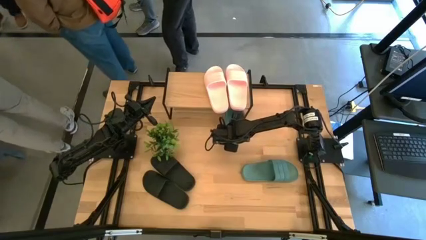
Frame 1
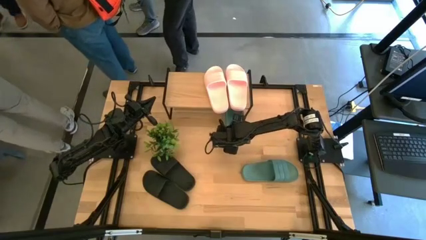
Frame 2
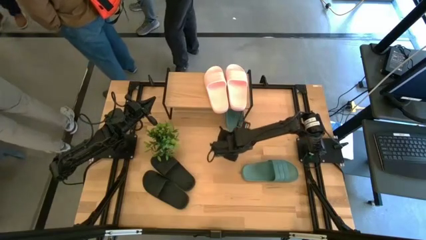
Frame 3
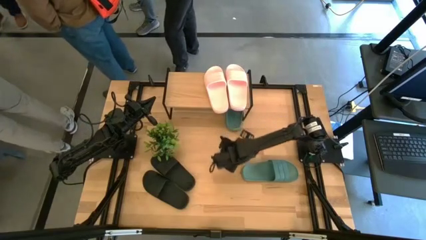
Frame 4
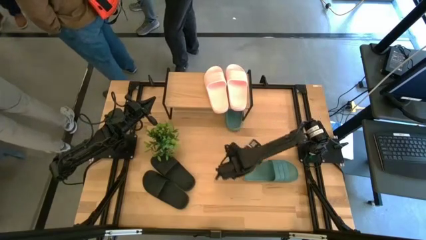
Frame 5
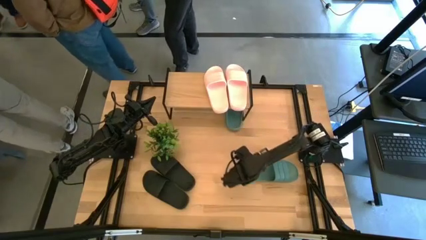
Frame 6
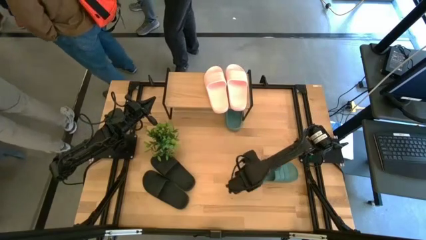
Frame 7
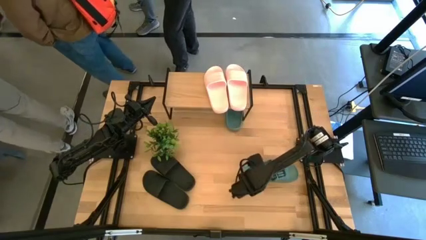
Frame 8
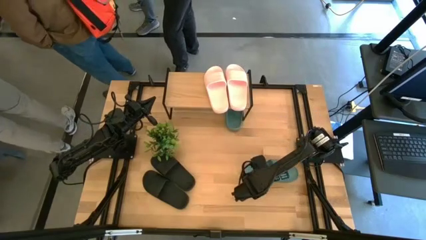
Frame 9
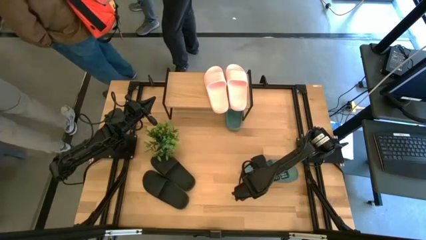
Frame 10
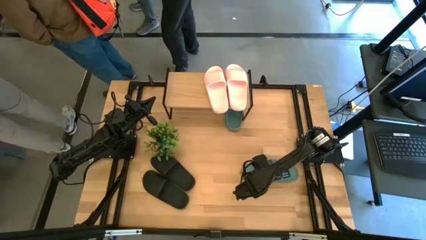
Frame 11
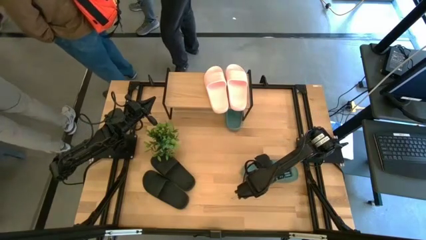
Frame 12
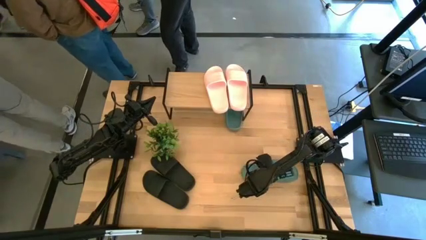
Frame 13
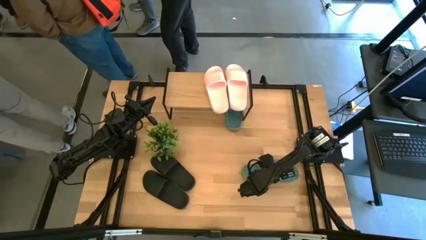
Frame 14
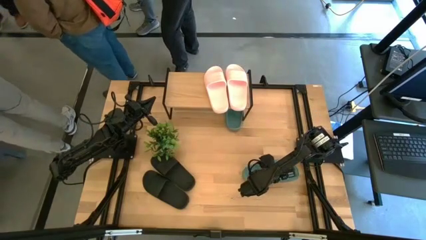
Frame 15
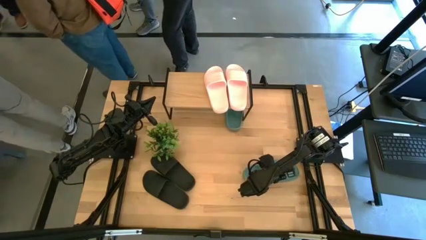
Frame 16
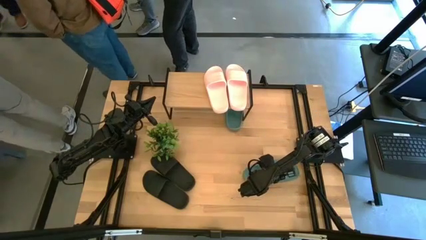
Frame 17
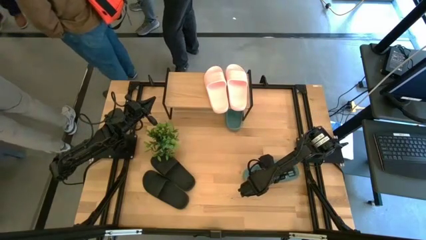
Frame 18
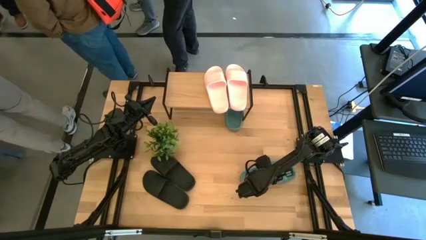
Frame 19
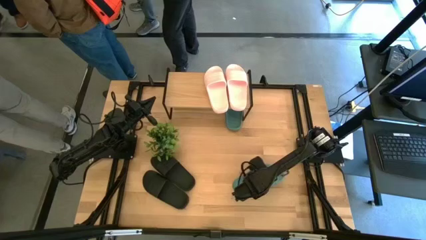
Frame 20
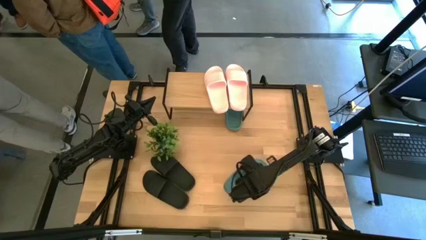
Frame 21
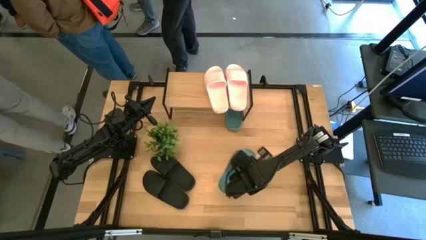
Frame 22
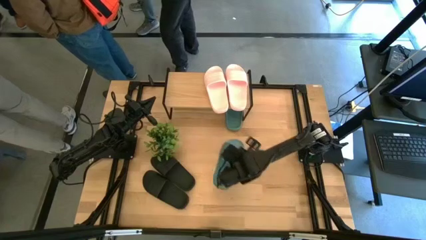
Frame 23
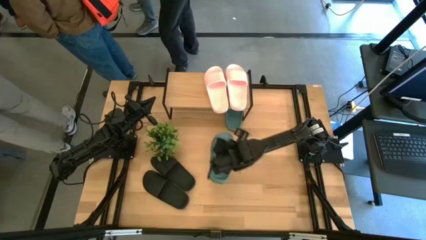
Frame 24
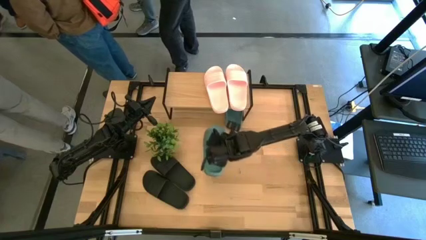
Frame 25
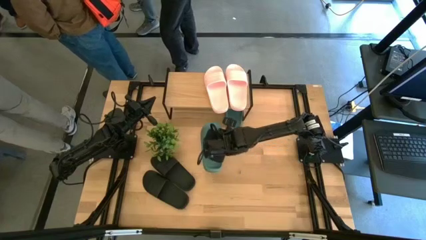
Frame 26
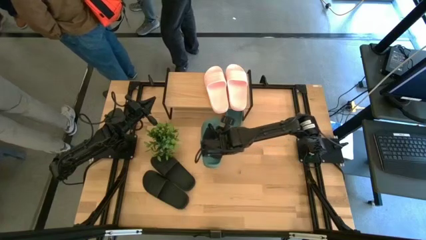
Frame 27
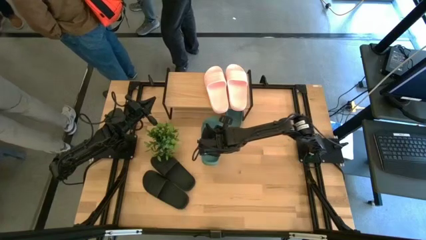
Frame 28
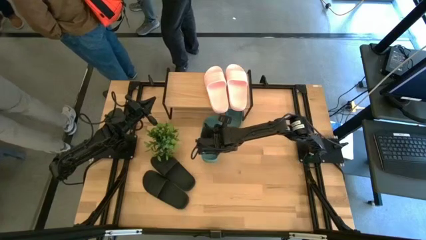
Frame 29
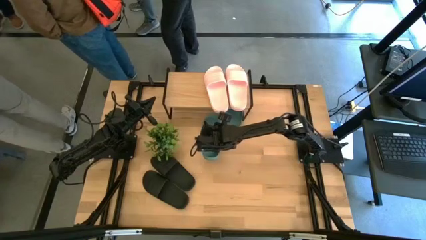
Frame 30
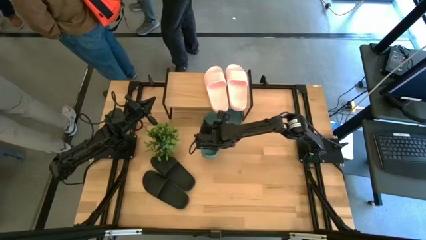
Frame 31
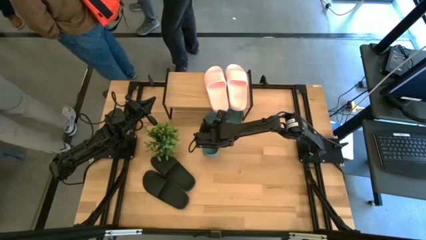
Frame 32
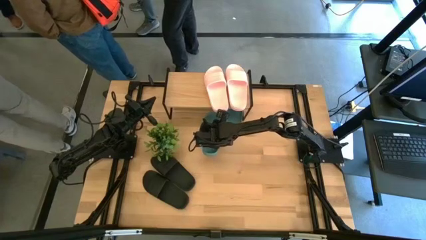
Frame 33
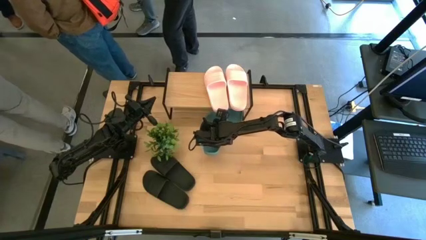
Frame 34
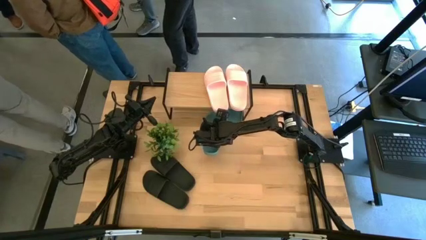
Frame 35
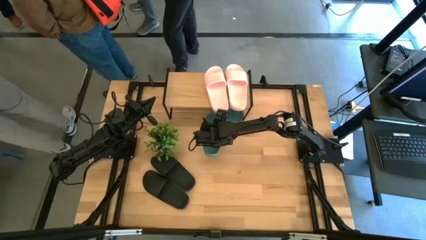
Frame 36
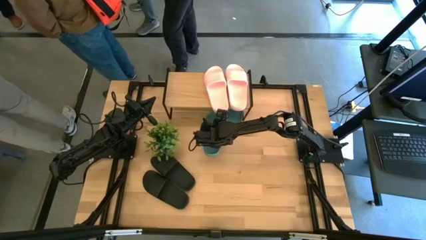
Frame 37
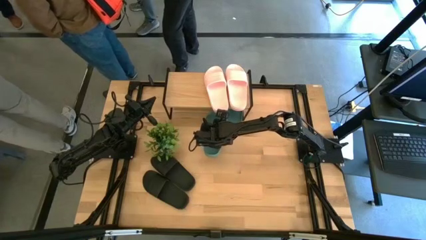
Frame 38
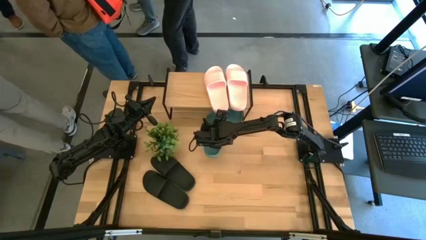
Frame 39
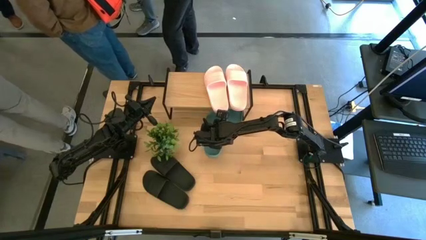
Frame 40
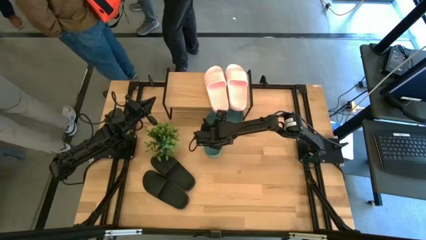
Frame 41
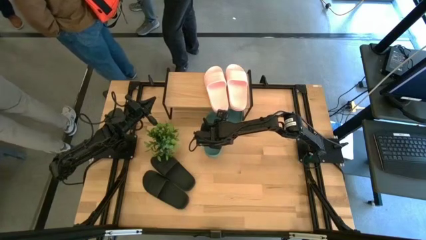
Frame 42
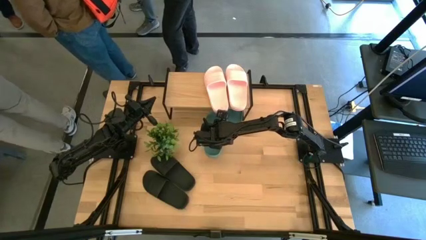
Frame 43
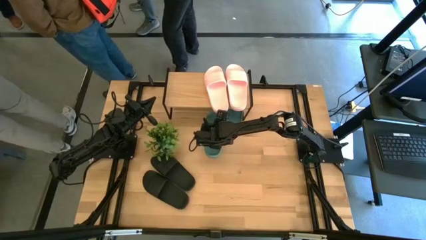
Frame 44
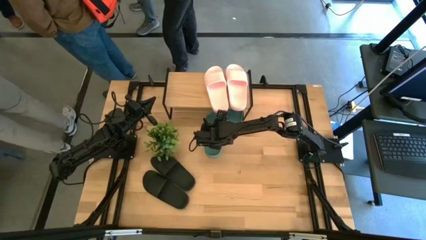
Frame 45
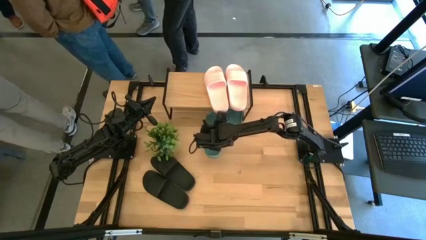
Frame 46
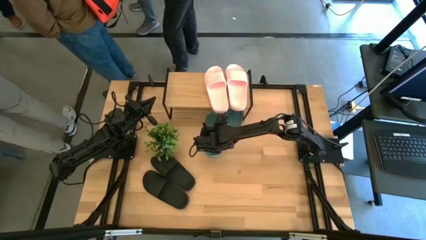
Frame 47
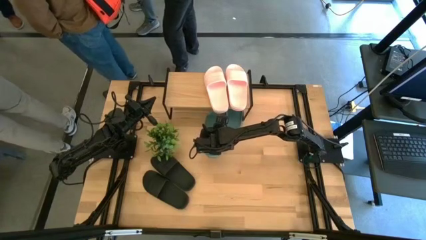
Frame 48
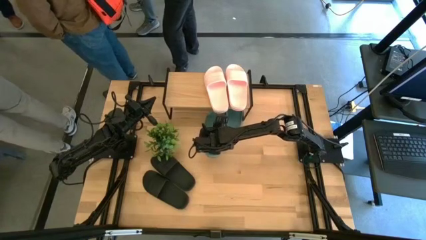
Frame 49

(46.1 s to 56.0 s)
Task: Pick and place slides into the shelf
Put the green slide under the shelf

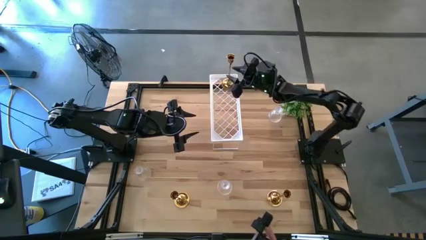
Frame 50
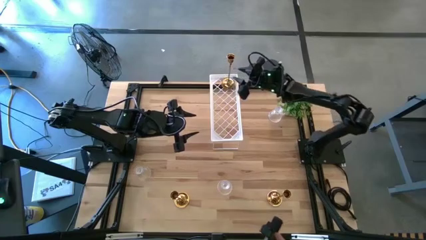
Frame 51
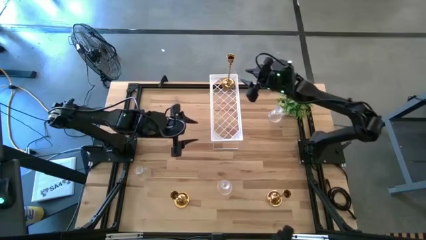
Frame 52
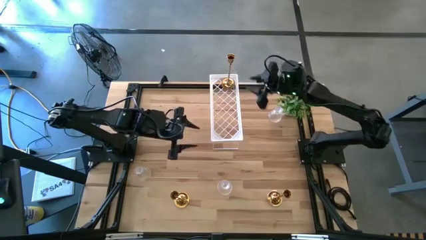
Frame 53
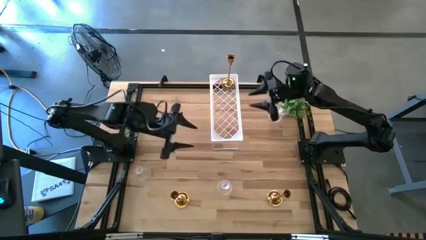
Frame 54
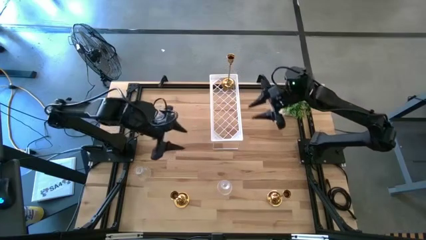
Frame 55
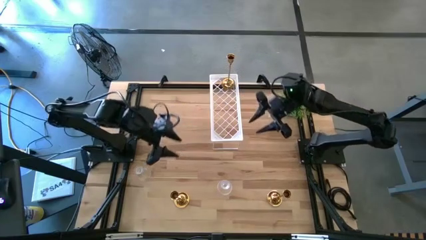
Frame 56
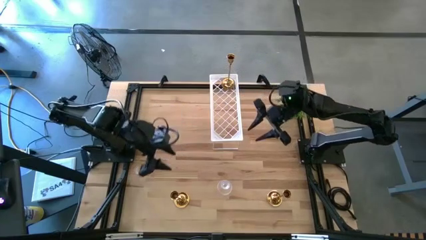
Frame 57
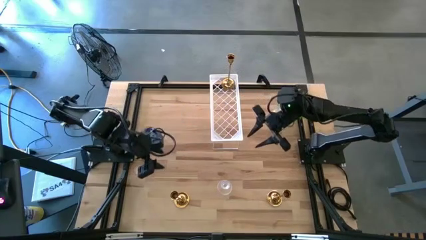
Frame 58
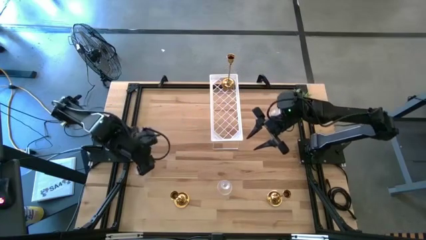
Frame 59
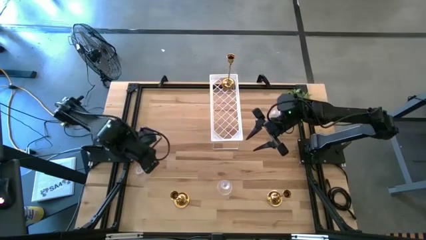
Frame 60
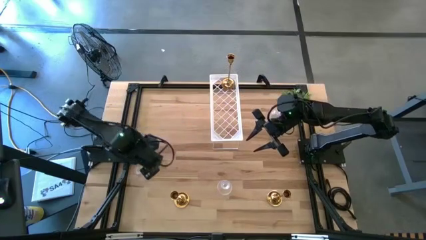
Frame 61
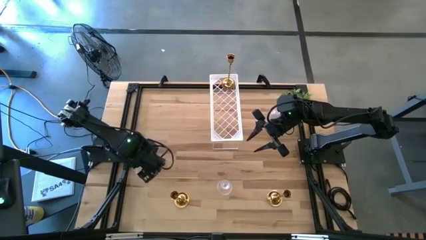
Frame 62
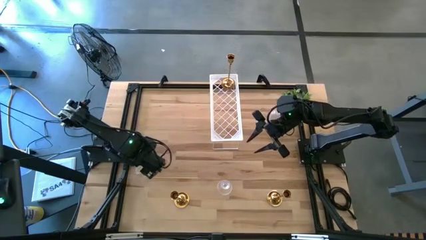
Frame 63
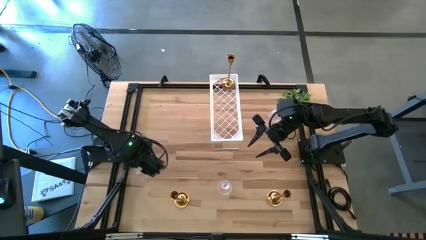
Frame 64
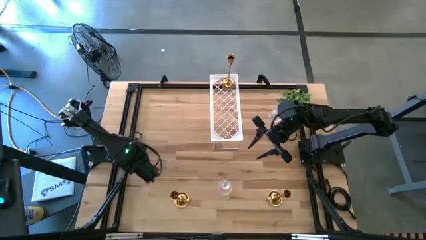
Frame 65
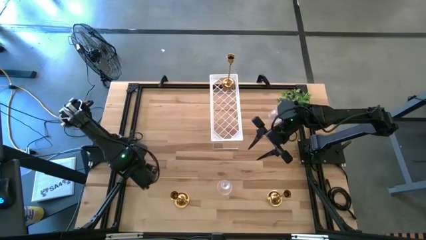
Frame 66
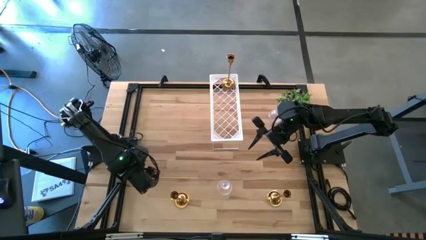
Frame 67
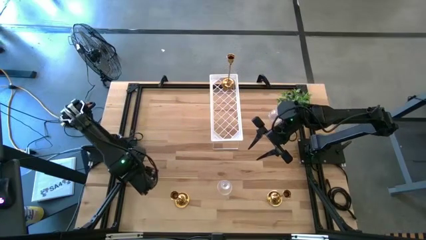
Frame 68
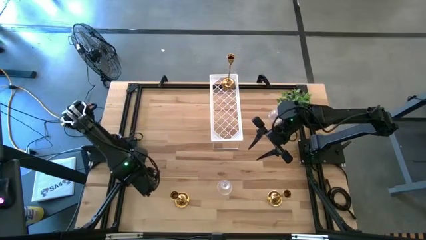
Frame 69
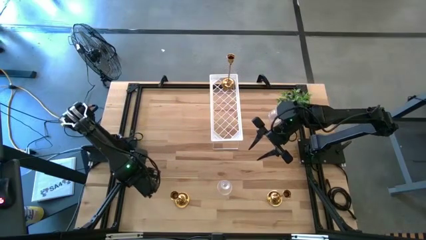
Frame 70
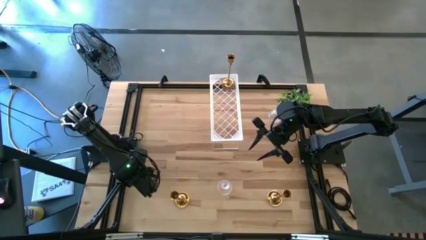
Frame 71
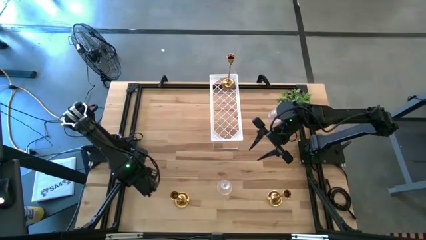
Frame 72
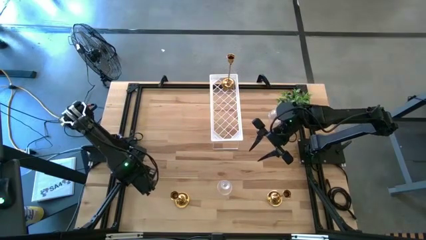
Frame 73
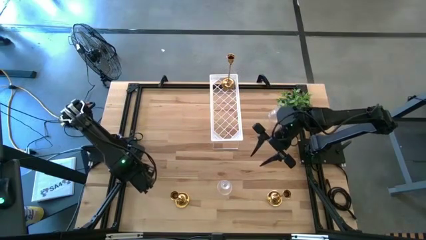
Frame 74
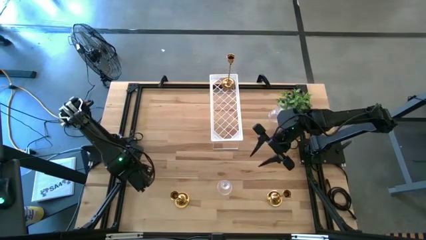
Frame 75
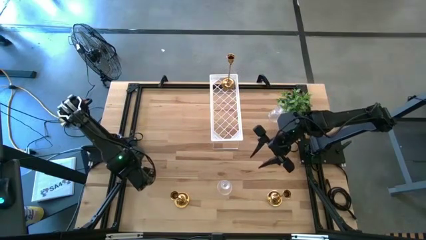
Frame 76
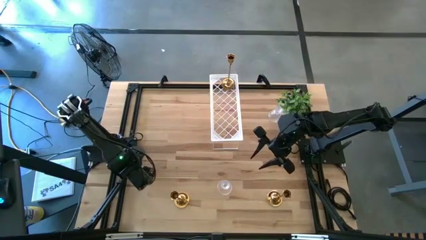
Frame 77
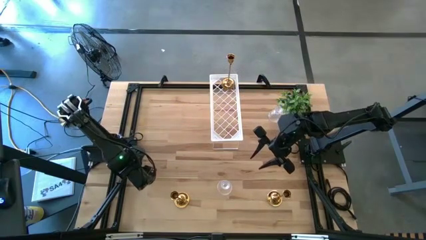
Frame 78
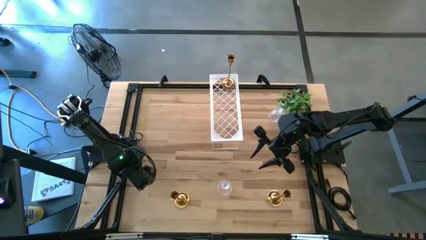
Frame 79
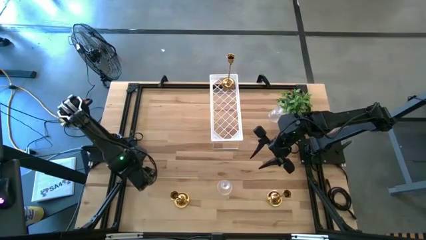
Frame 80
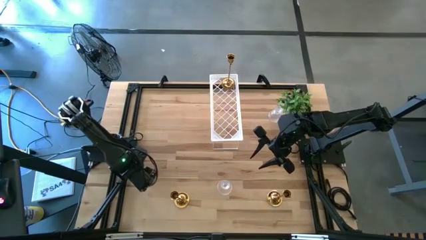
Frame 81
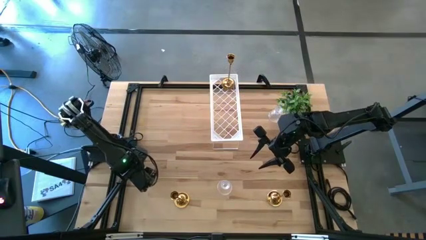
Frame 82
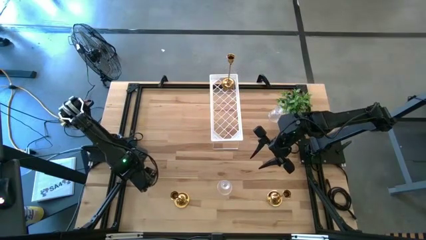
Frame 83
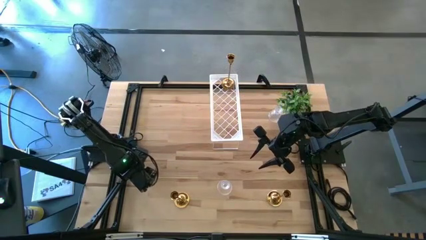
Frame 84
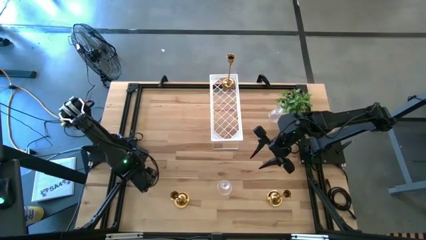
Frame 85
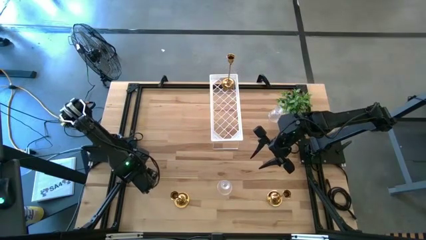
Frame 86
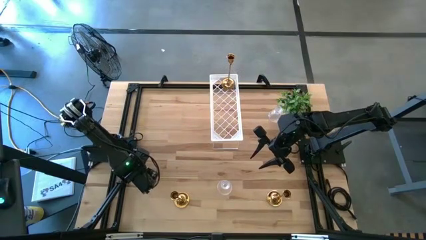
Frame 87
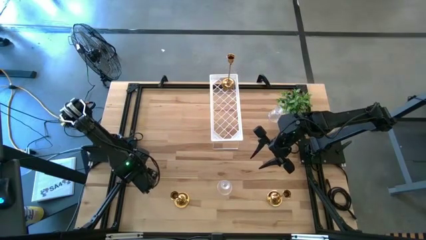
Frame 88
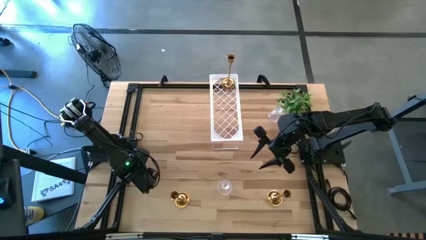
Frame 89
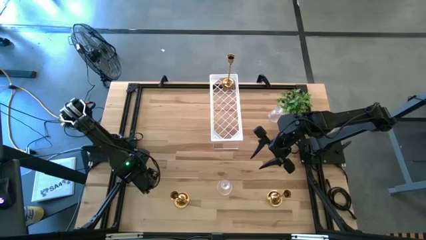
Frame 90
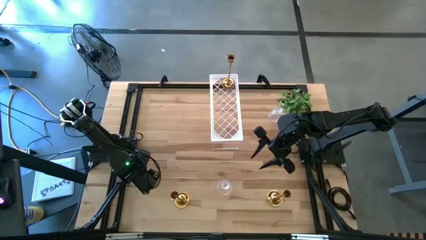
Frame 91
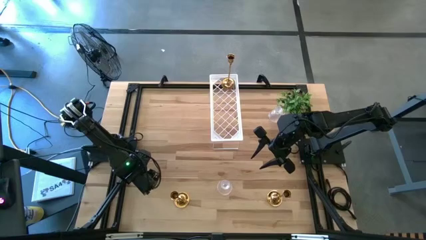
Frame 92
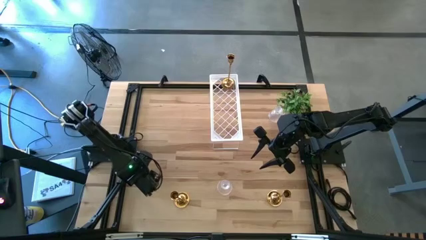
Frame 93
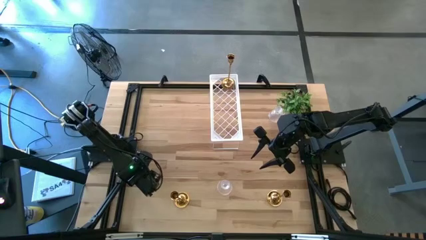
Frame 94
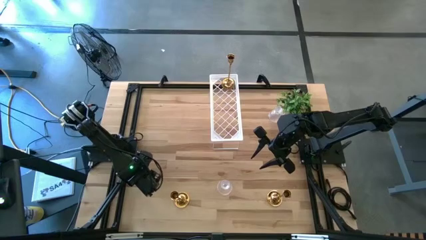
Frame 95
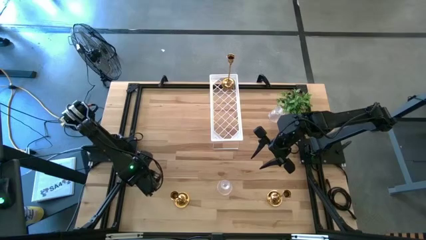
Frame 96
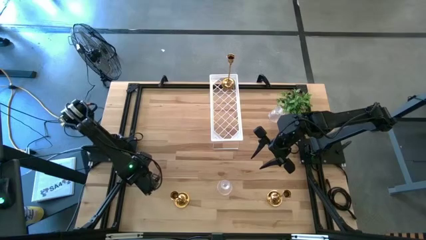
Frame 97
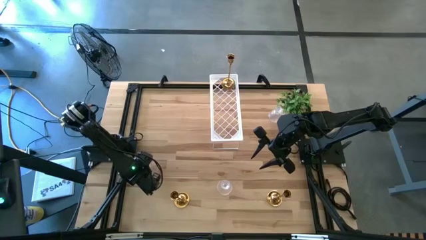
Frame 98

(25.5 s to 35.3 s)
Task: Pick & Place candle stick holders
Put the left transparent candle holder on the shelf
